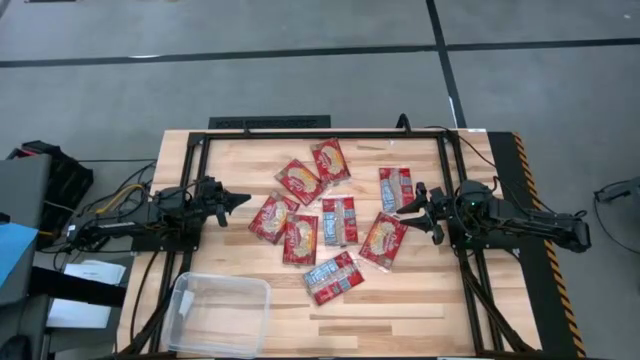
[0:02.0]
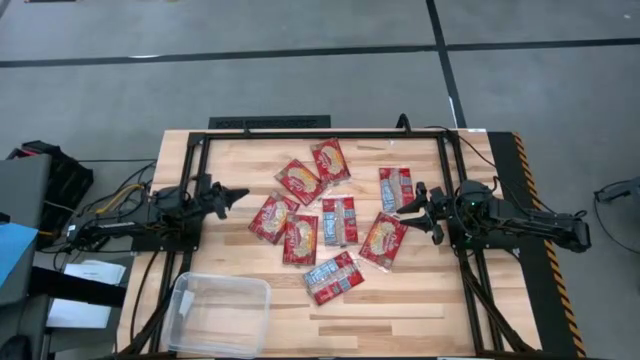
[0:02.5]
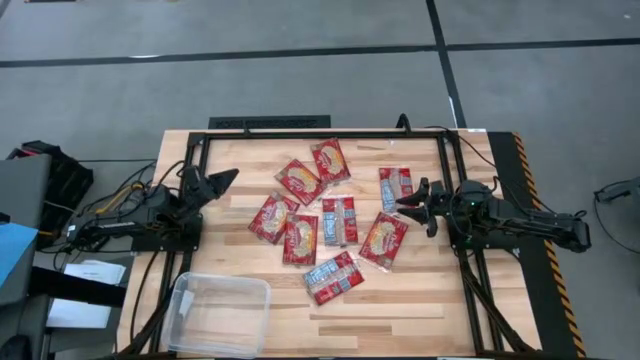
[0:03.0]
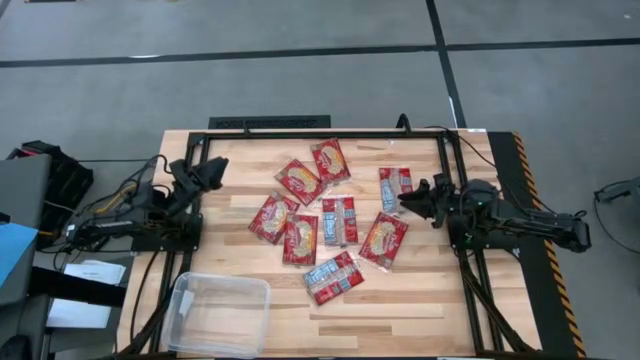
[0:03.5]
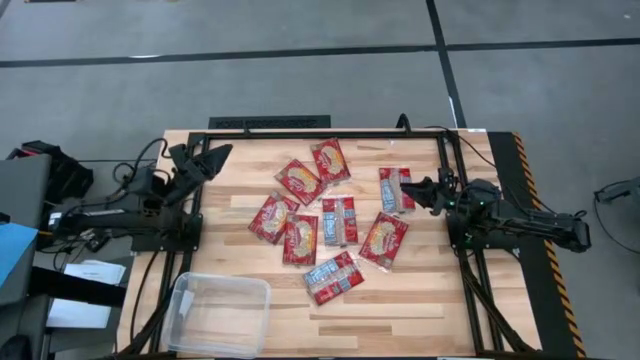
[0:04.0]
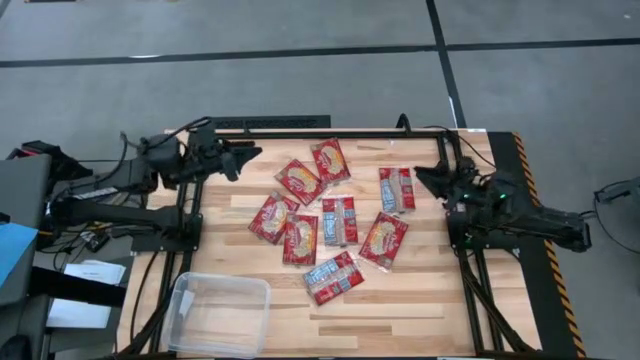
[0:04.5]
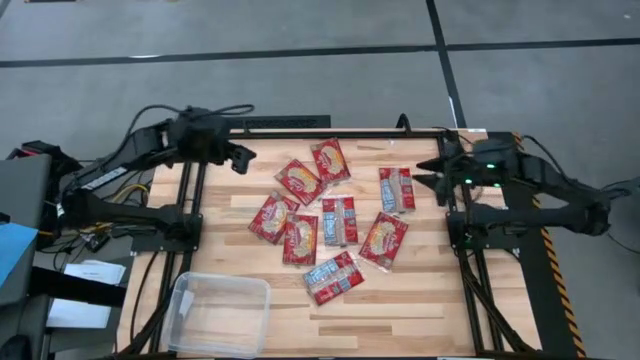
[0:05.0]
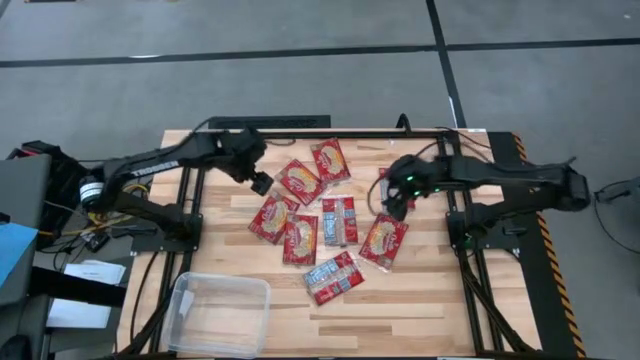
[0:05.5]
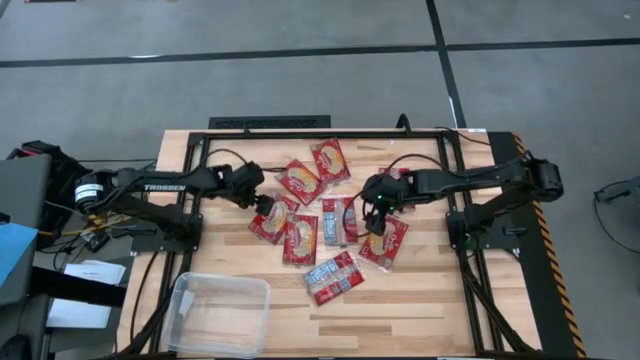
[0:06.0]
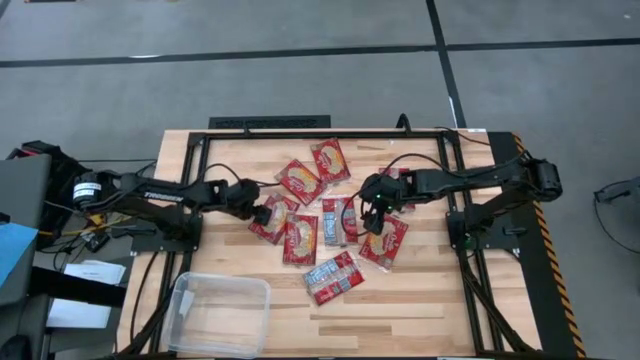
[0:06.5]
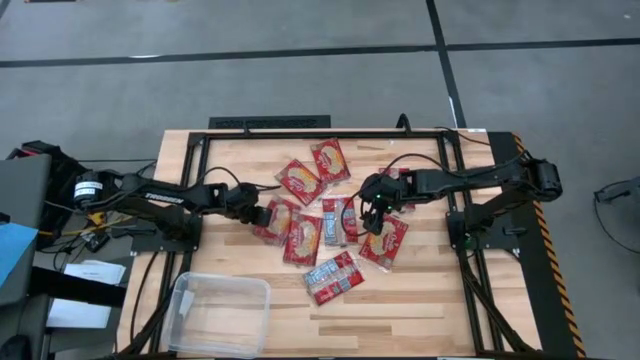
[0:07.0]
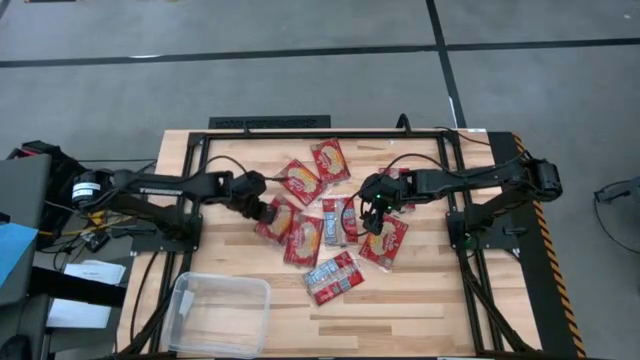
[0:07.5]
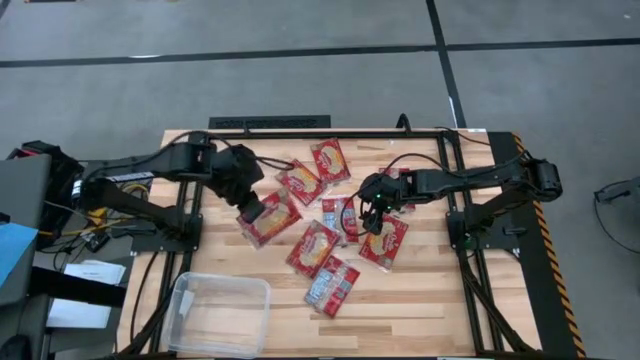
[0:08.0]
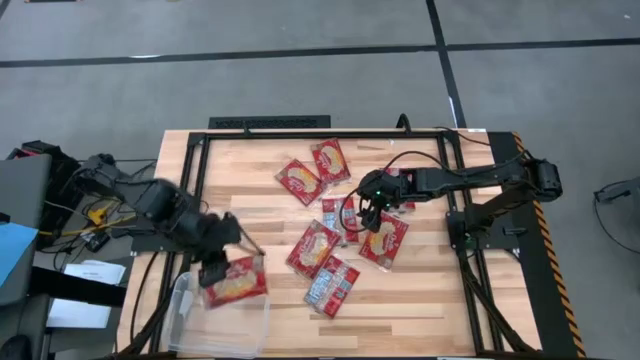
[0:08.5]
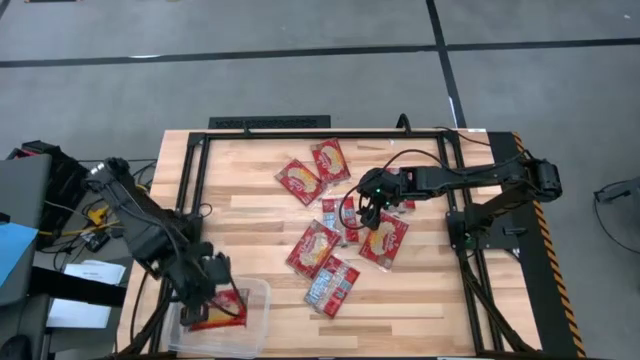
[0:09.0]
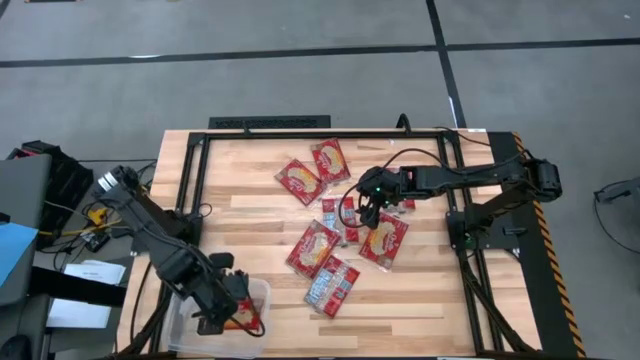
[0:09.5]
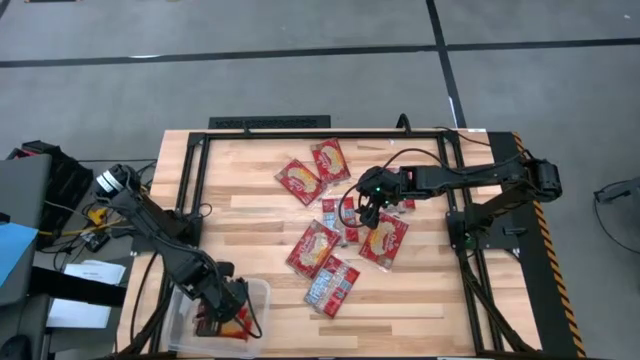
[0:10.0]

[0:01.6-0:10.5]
Task: Sort popcorn bags into baskets
Put the red popcorn bag into the transparent bin

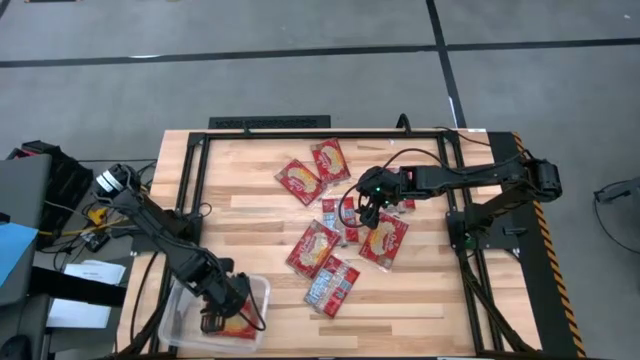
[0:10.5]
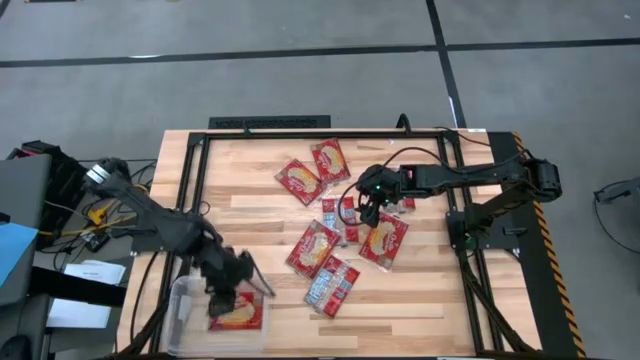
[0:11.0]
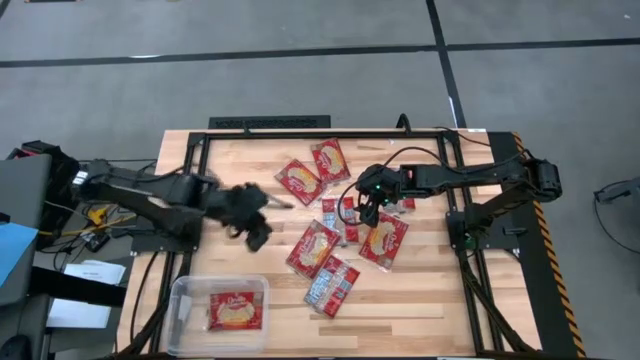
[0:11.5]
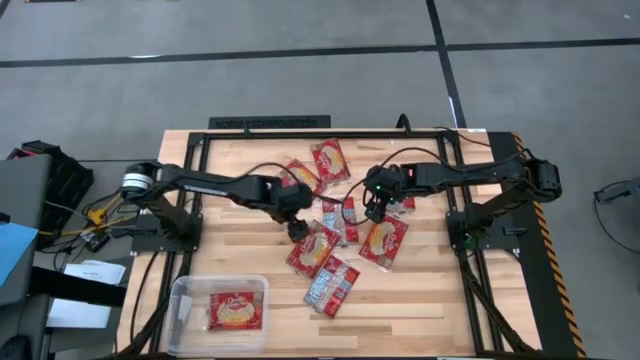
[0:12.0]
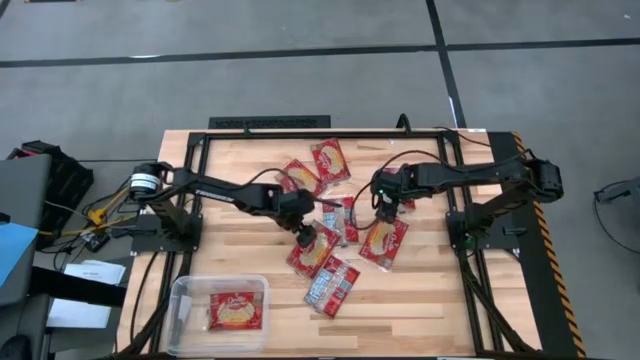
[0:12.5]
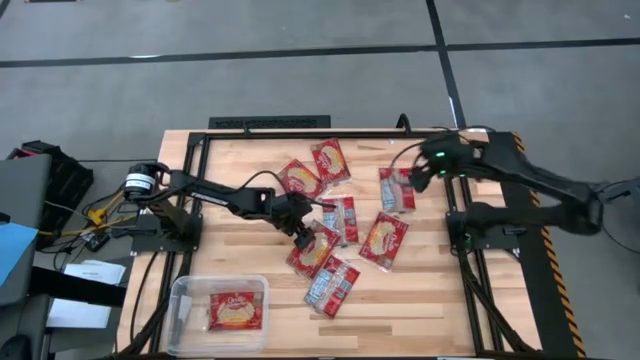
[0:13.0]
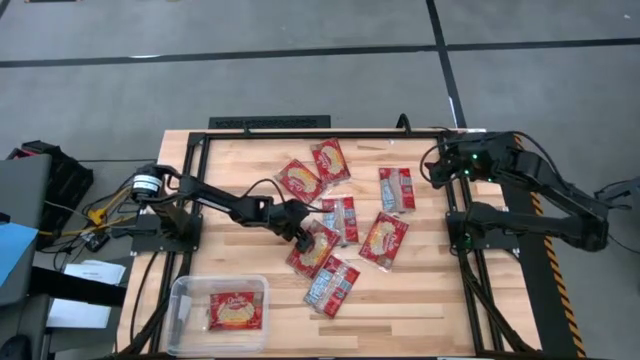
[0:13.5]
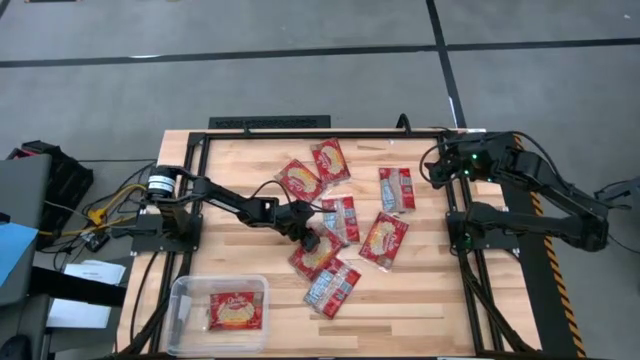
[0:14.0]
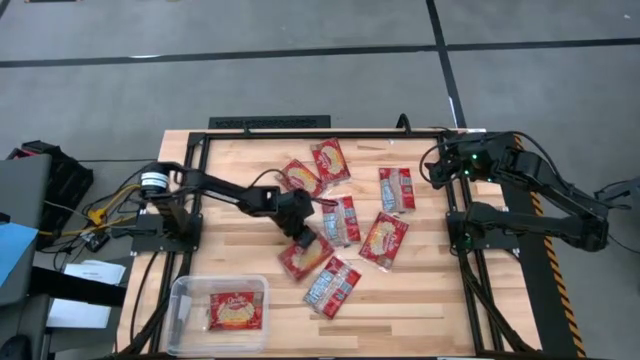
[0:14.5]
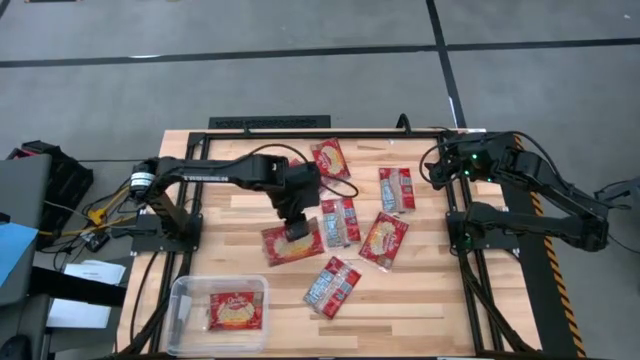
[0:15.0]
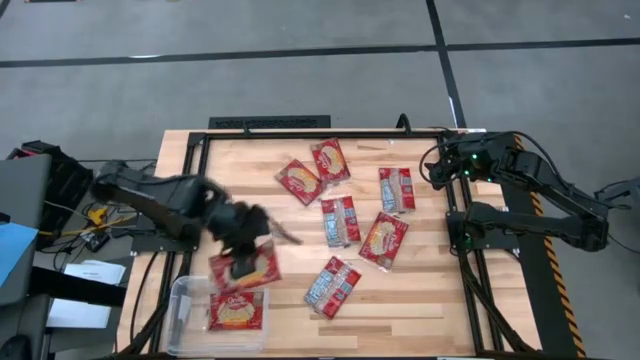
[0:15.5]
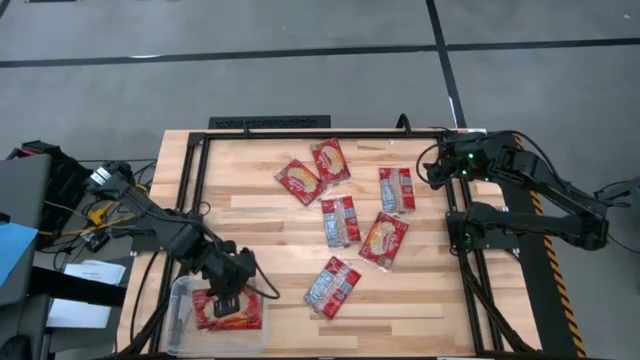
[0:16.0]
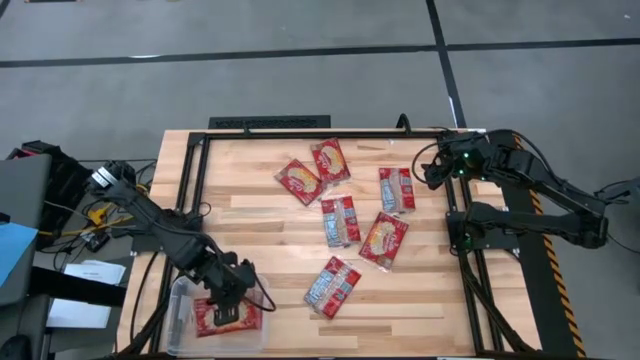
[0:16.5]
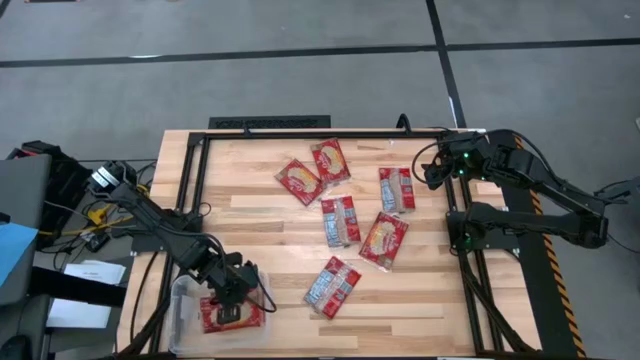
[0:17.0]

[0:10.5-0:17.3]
Put the red popcorn bag into the transparent bin

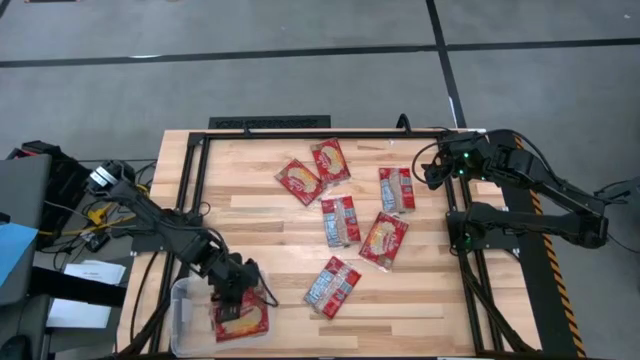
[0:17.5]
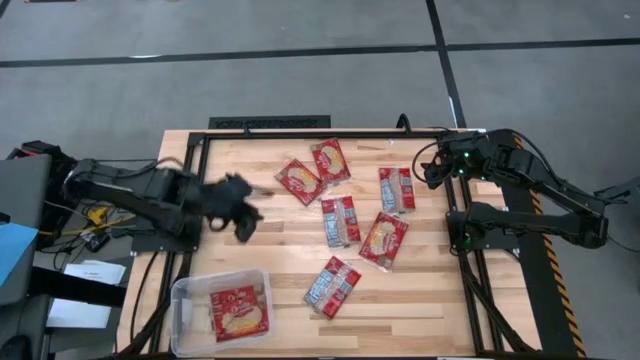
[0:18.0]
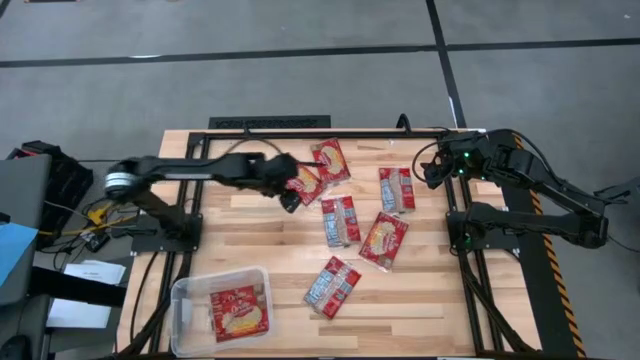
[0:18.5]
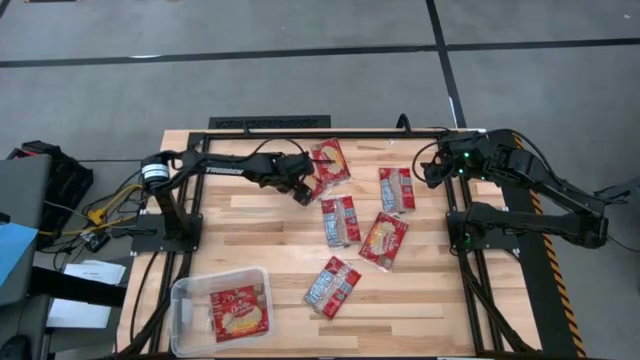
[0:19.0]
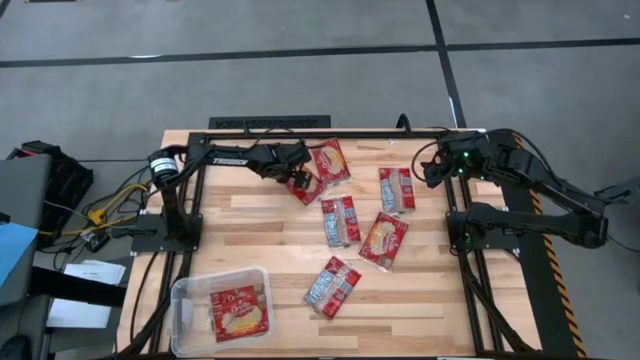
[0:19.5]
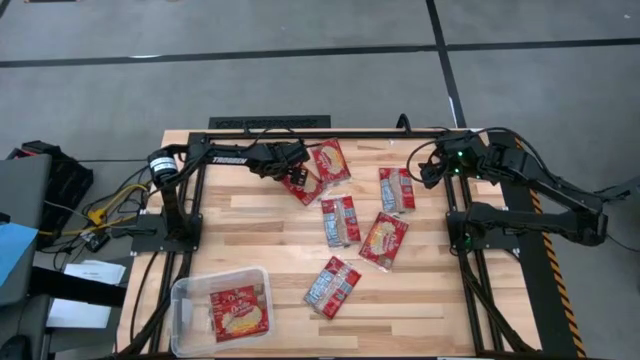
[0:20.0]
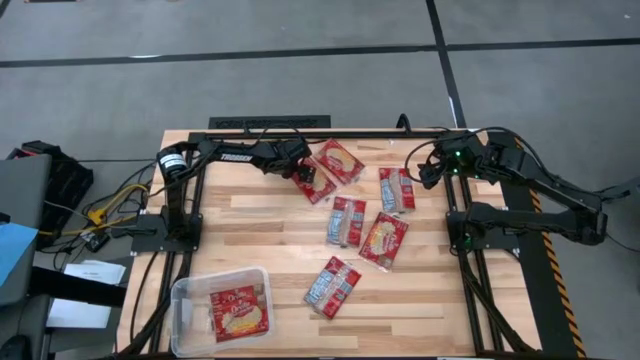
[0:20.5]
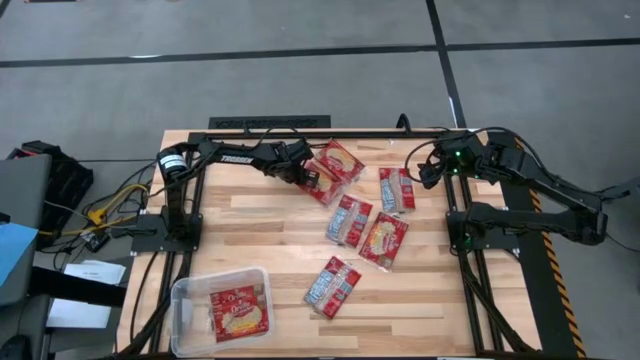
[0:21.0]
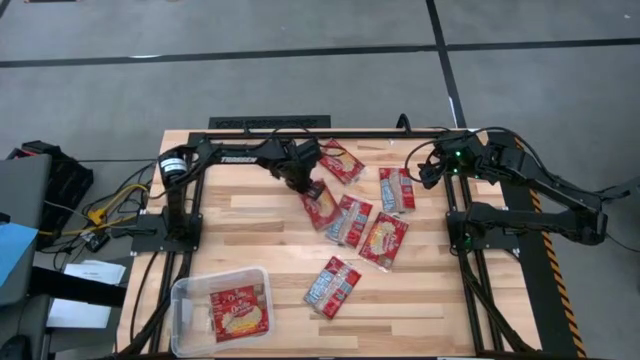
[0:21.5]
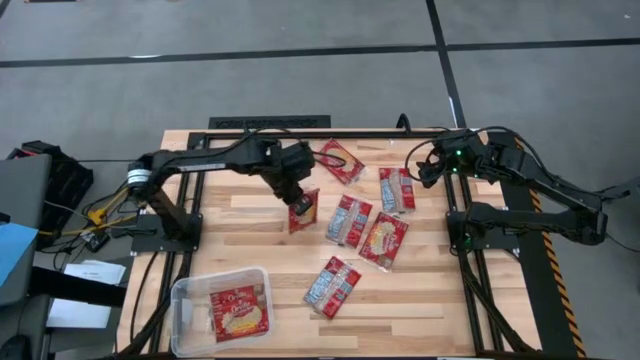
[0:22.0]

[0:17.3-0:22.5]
Put the red popcorn bag into the transparent bin

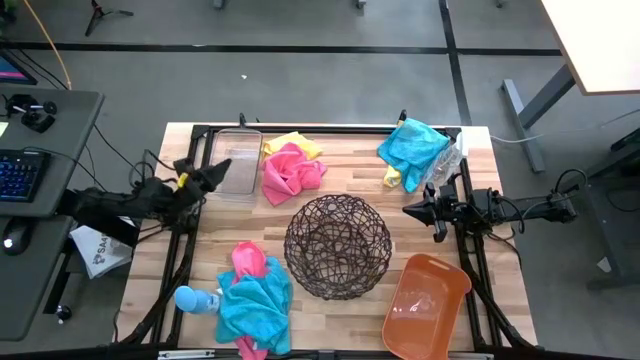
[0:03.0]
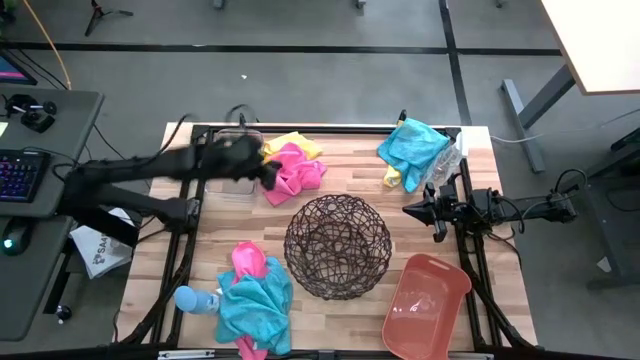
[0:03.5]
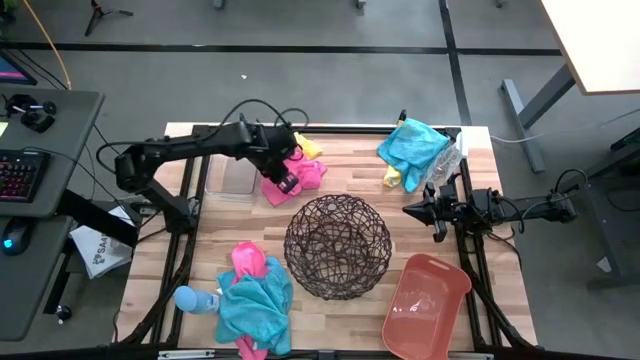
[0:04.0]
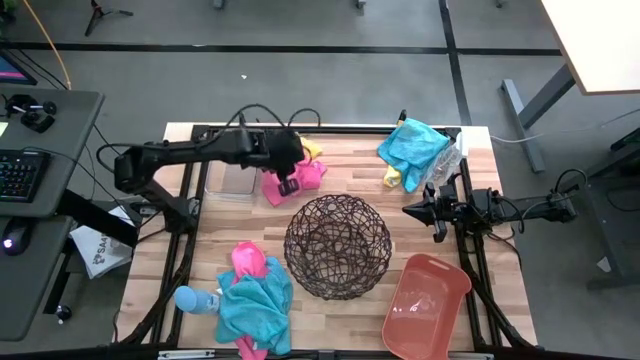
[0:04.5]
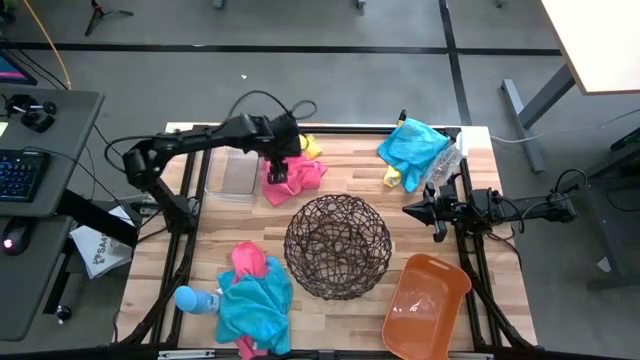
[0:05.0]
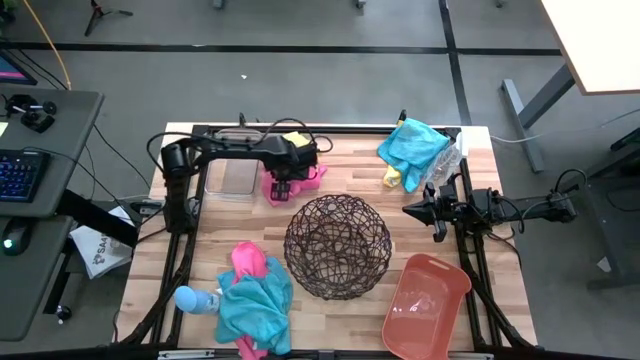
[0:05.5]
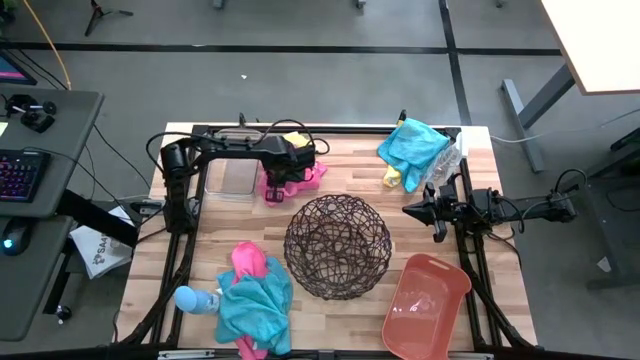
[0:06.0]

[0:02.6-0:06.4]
Task: Sort microfiber towel by color & place in baskets
Put the top pink towel into the transparent bin
